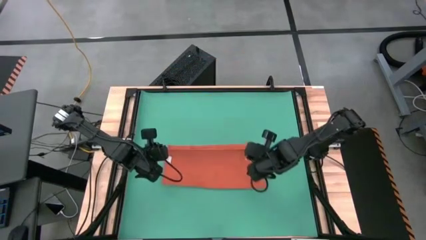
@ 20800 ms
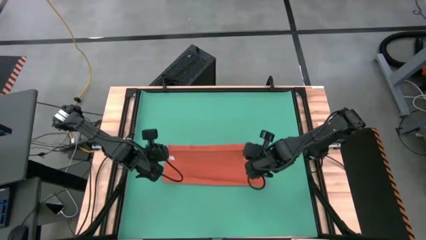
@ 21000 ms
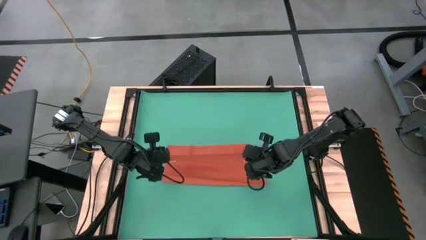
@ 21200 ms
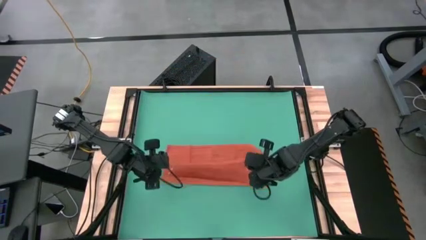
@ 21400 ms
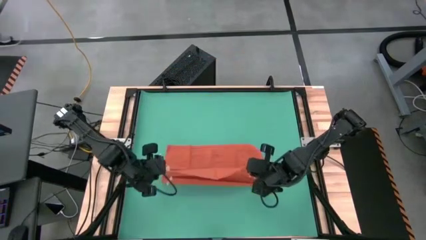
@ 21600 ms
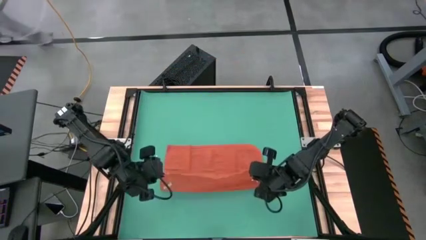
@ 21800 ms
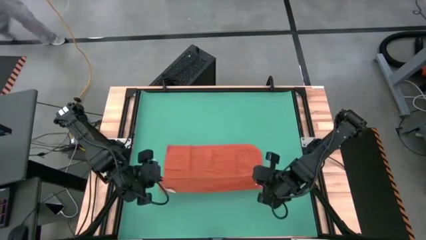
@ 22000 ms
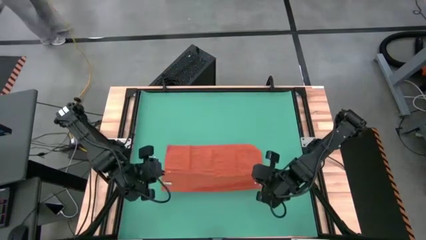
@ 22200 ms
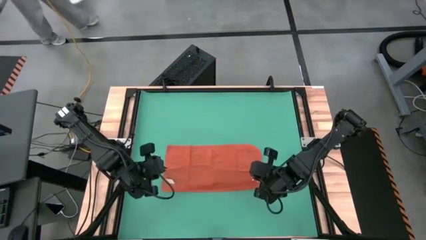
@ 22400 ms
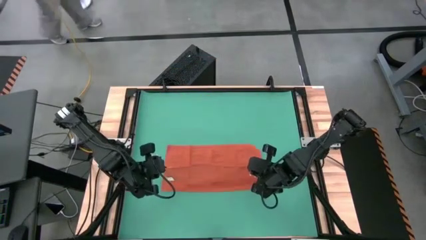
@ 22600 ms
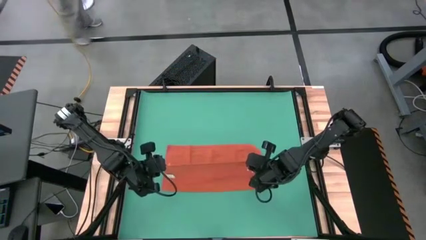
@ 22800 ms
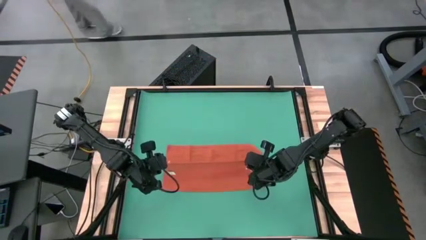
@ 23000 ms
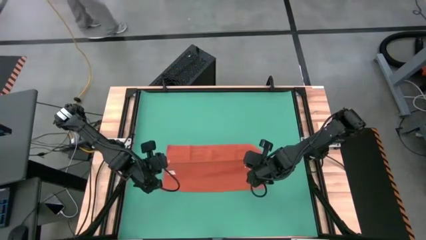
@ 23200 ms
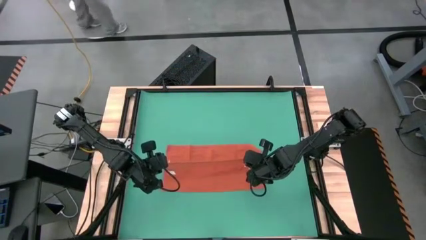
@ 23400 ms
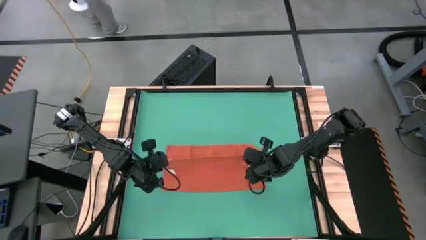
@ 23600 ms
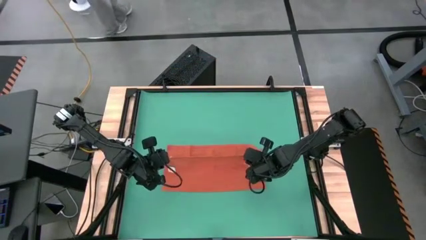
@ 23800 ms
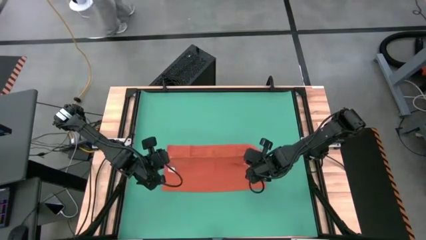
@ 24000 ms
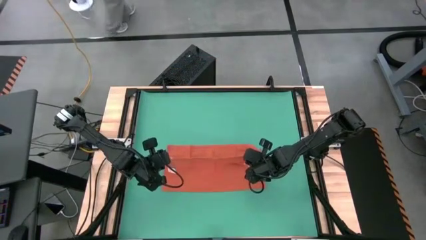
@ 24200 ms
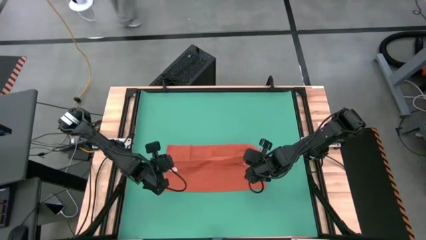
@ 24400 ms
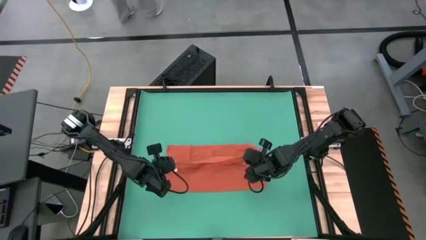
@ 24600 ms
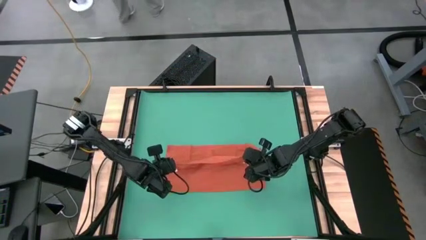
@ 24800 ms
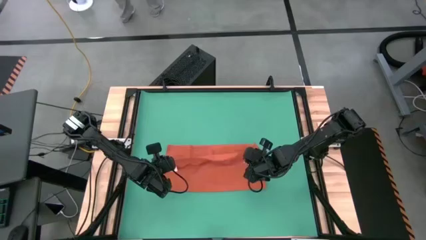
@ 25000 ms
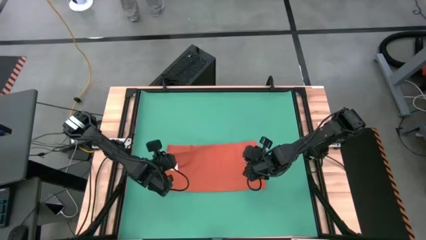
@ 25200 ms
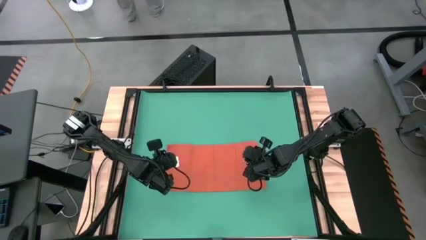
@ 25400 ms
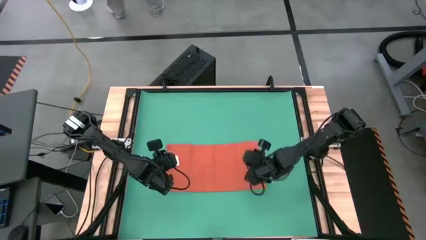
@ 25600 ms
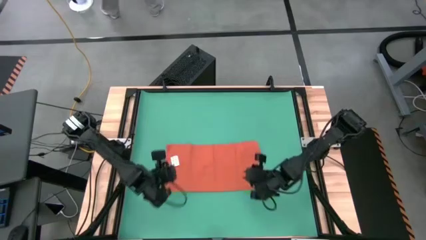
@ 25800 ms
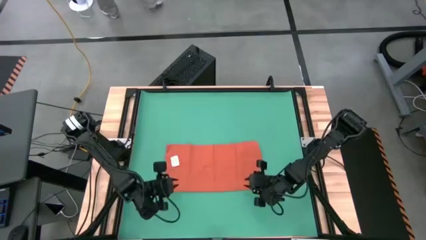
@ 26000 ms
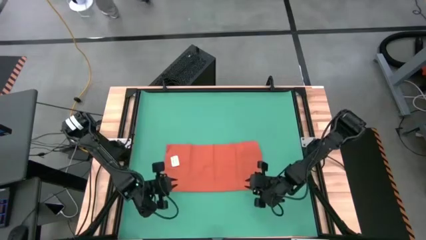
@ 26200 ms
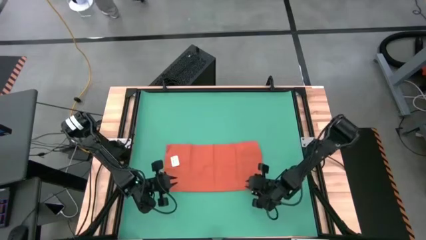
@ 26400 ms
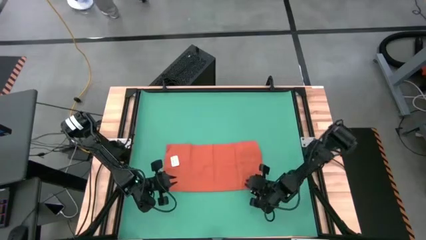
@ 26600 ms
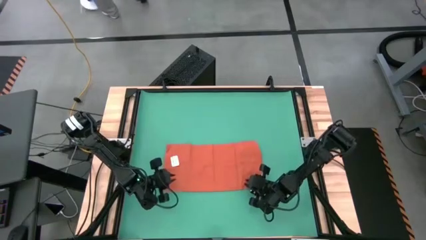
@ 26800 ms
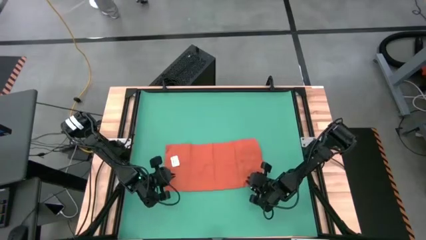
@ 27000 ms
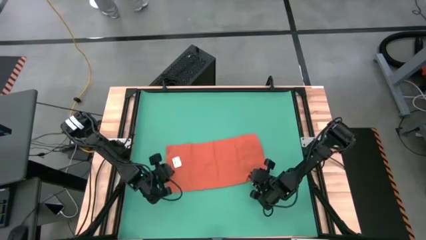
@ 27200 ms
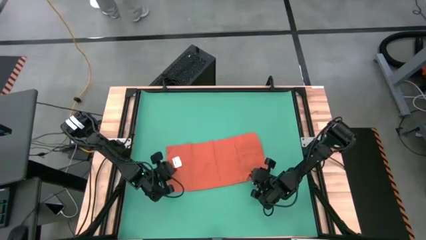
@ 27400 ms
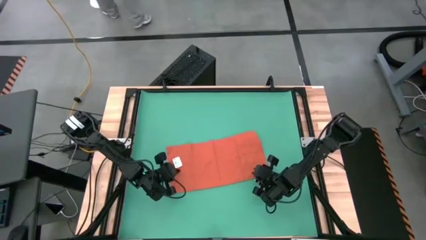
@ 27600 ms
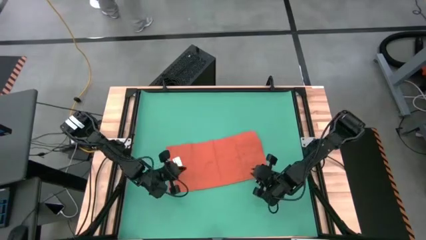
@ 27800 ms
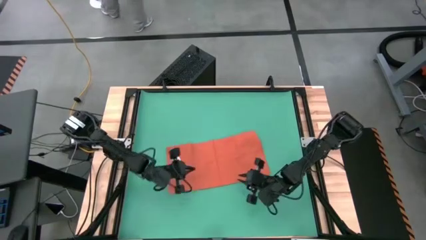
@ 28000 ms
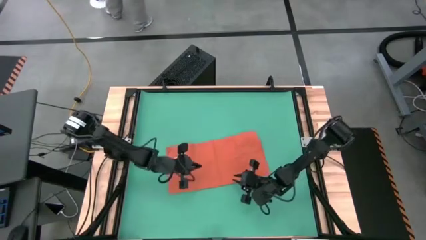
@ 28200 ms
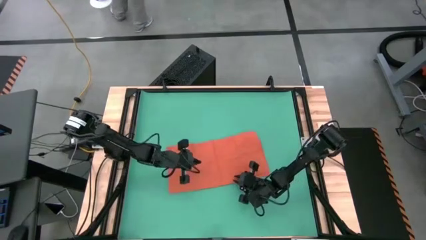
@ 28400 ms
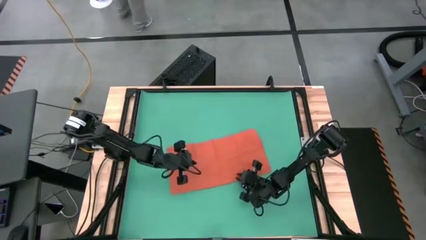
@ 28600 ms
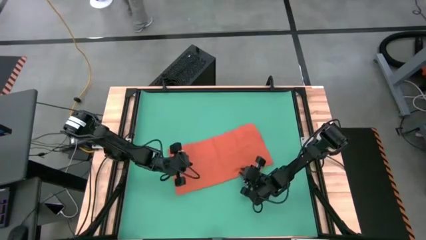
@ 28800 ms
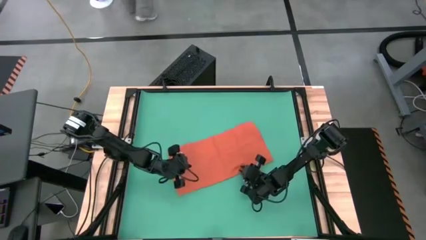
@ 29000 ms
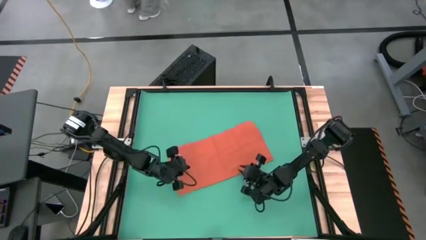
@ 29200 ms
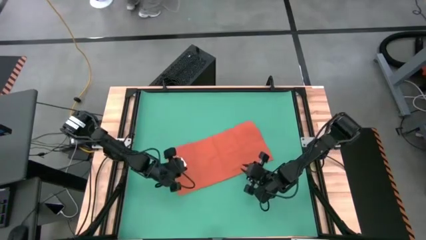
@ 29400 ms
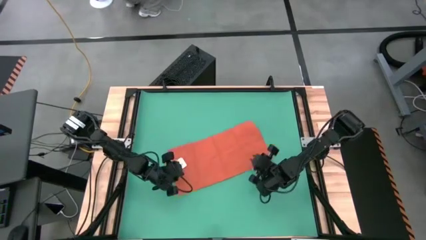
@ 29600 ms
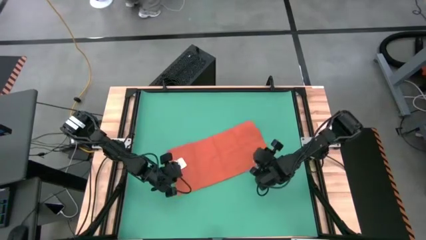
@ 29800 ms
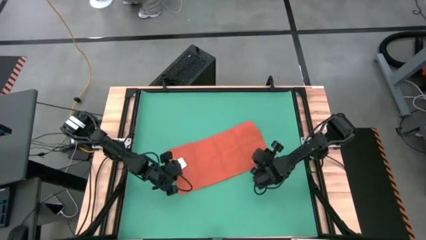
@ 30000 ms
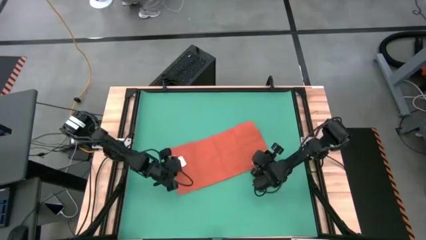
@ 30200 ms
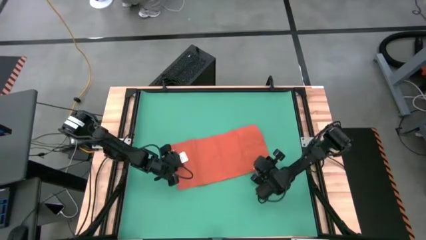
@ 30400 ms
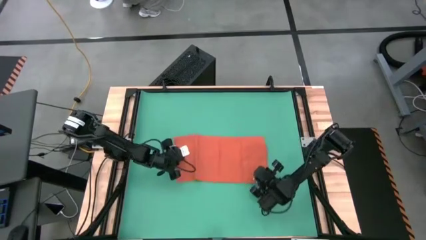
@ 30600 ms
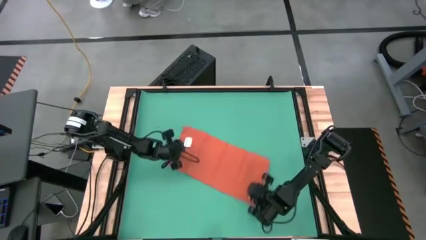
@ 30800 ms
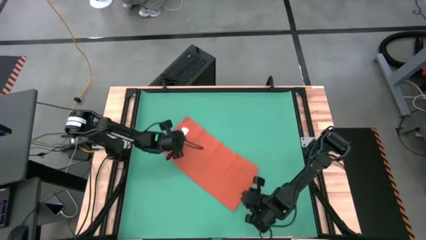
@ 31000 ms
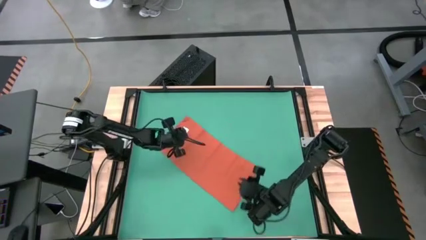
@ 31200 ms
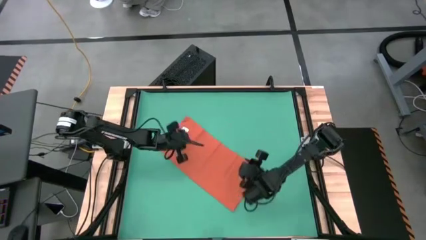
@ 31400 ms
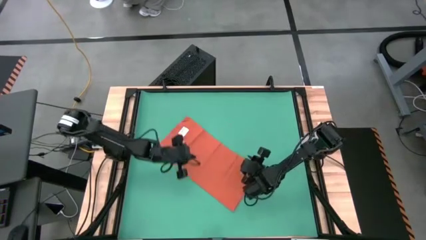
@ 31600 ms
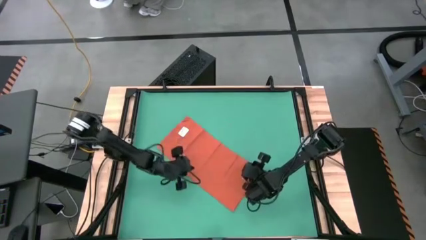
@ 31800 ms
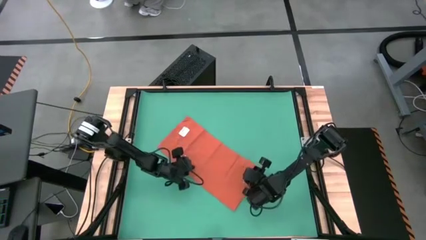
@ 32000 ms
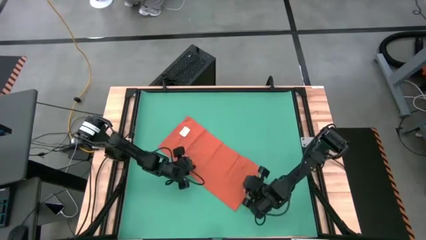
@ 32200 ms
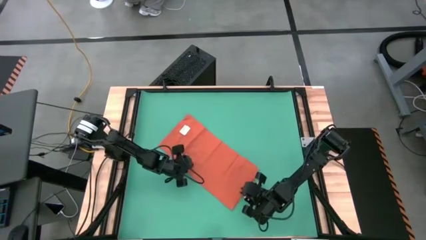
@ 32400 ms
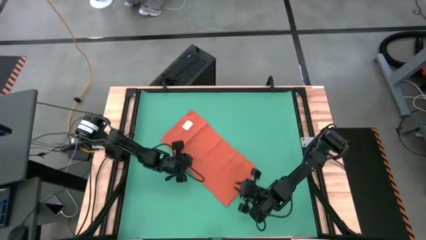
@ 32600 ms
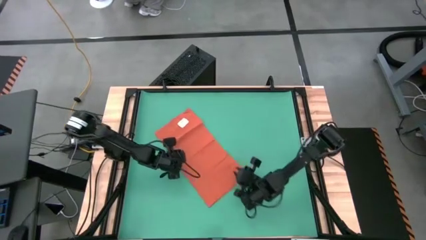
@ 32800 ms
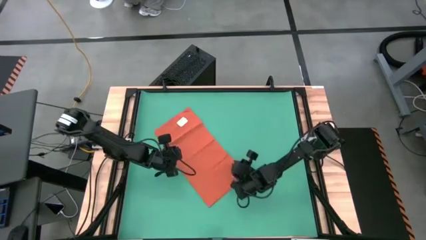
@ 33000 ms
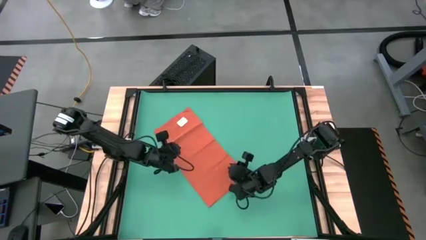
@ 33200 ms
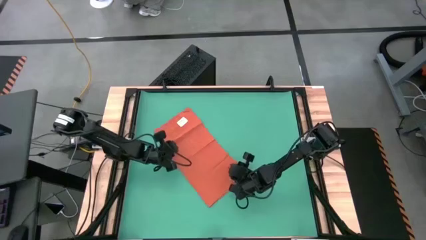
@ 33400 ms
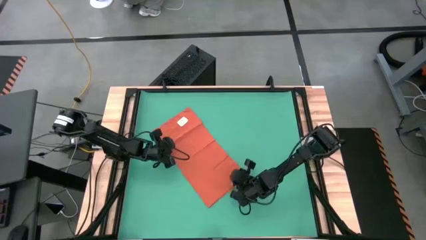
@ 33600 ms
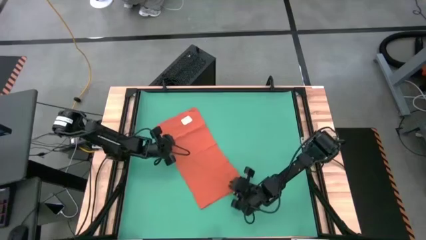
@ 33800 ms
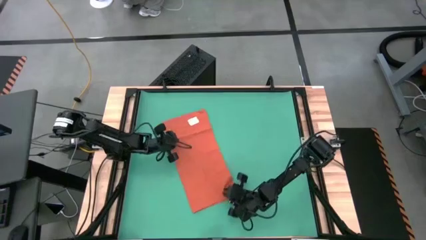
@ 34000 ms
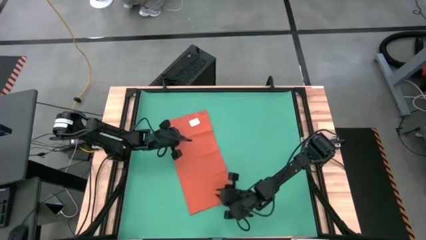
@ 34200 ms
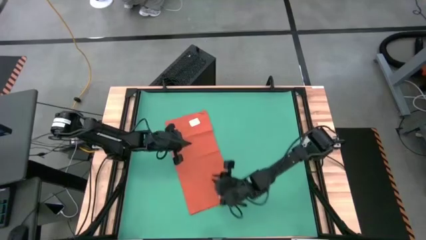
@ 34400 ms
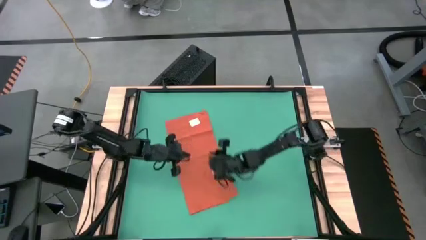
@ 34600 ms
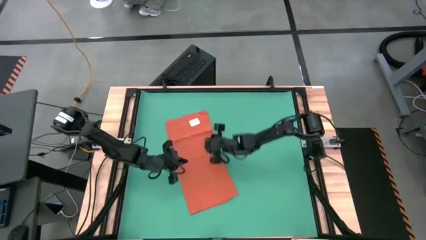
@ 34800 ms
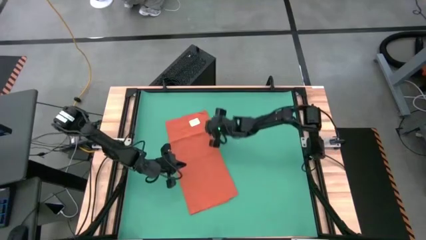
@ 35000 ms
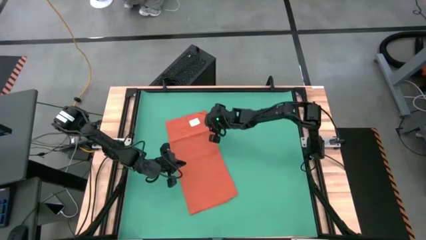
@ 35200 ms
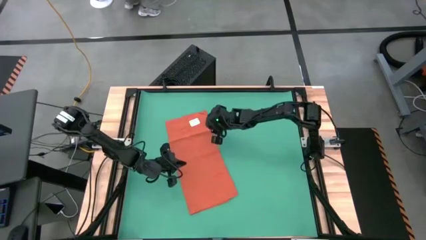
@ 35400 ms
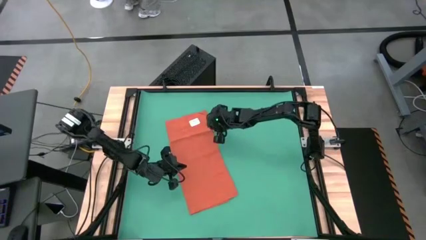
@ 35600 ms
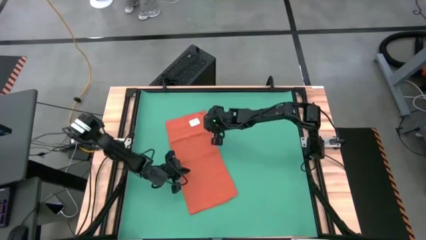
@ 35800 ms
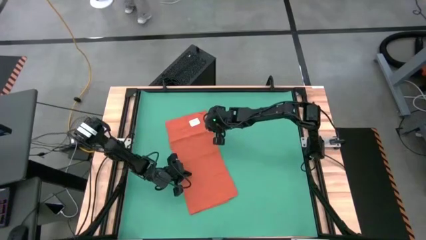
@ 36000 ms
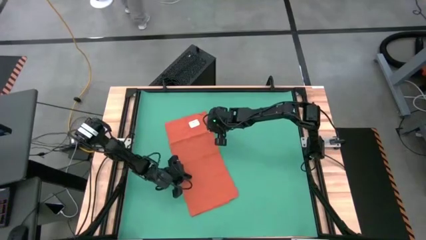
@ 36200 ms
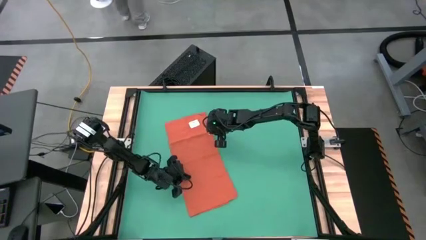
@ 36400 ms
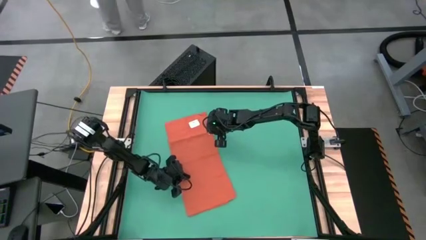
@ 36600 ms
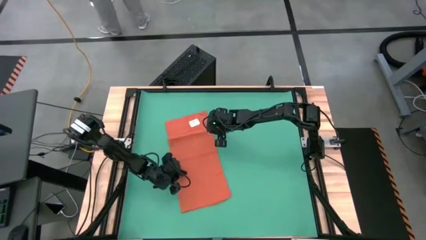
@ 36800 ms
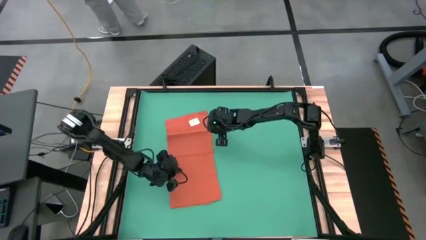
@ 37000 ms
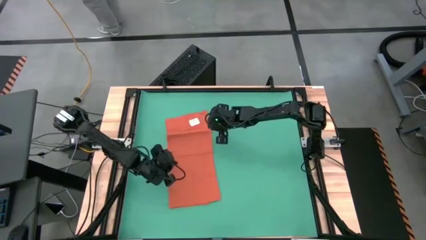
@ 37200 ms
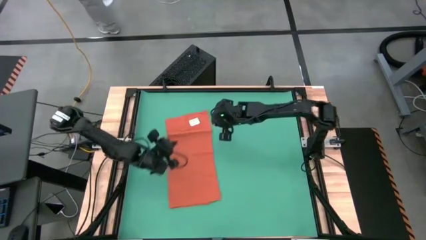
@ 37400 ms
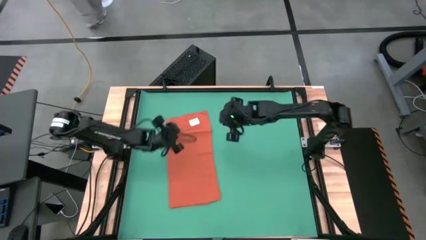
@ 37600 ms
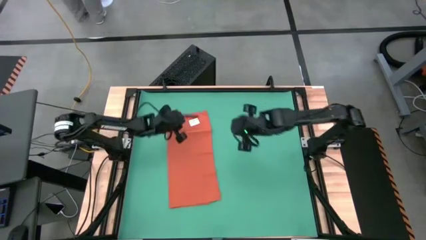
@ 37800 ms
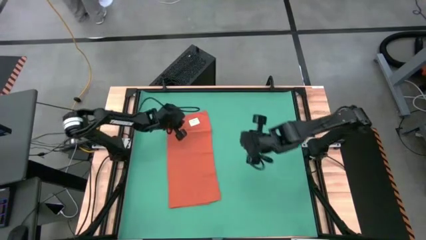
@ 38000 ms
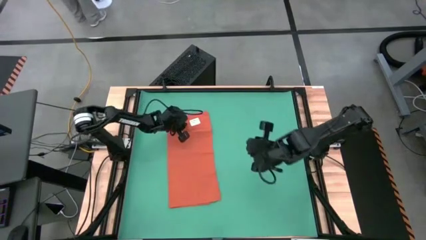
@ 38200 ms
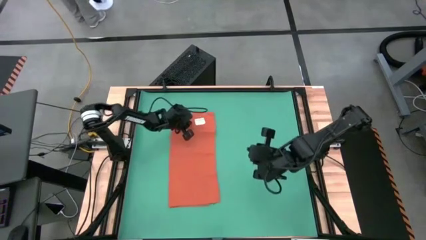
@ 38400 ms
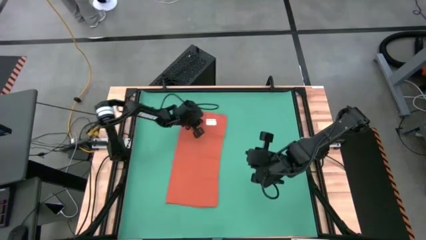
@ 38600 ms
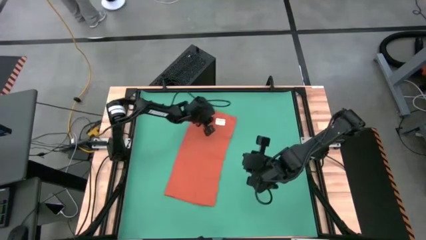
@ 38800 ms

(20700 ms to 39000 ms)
Task: Roll towel
Fold the orange towel
